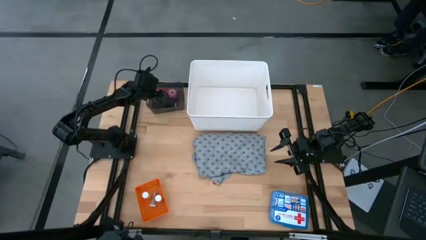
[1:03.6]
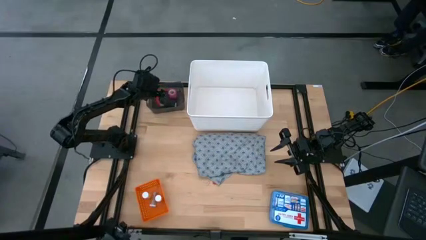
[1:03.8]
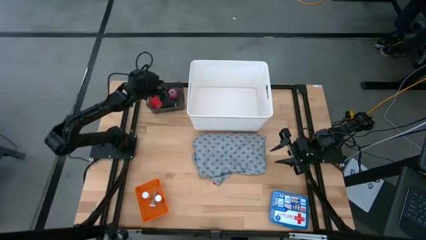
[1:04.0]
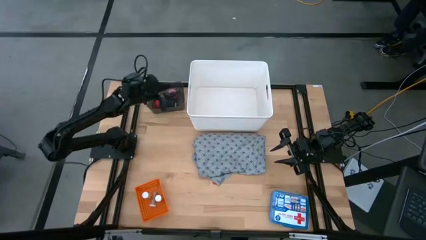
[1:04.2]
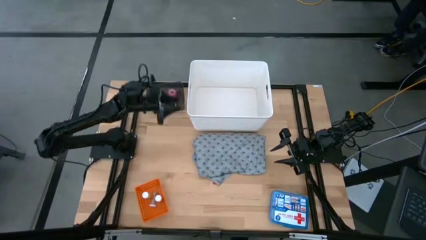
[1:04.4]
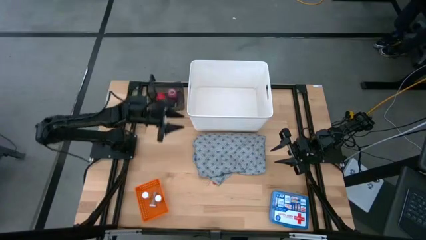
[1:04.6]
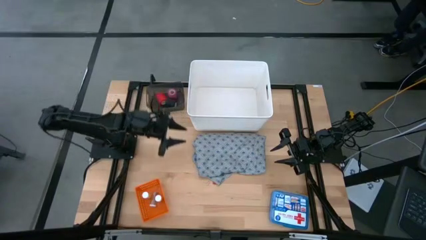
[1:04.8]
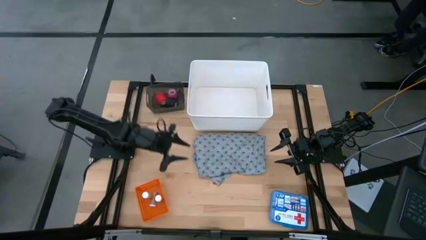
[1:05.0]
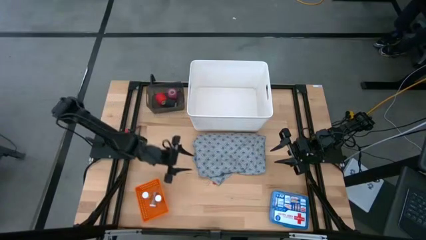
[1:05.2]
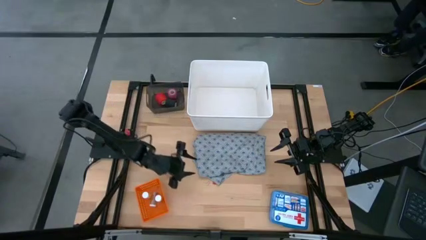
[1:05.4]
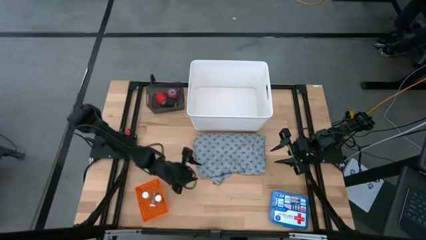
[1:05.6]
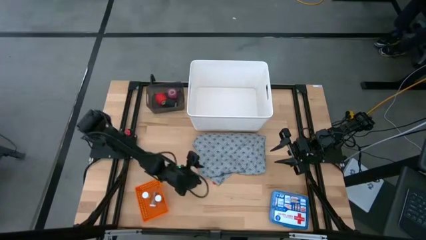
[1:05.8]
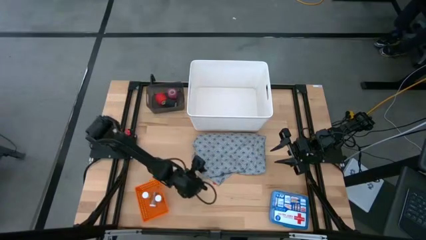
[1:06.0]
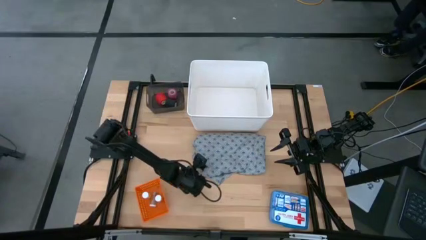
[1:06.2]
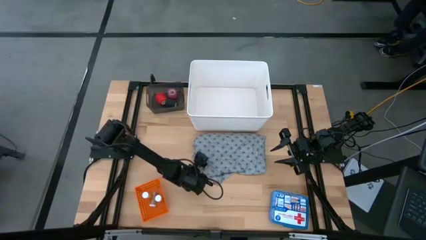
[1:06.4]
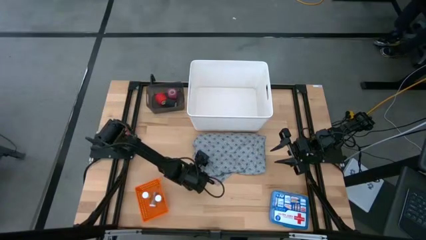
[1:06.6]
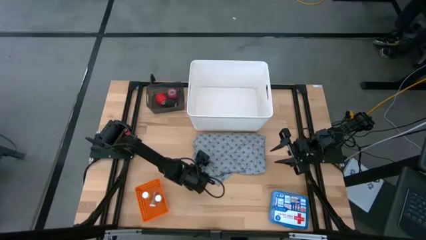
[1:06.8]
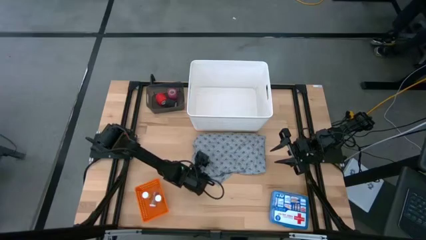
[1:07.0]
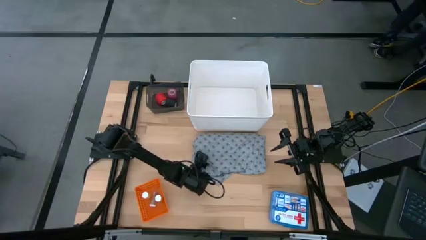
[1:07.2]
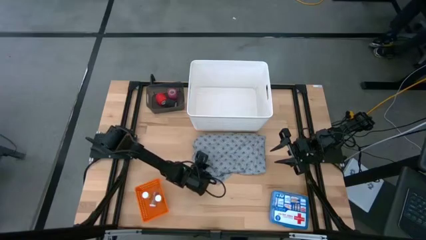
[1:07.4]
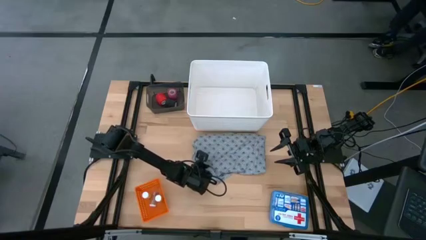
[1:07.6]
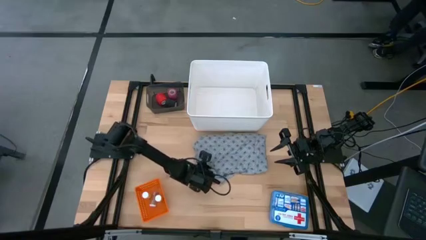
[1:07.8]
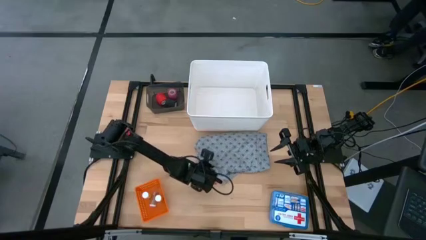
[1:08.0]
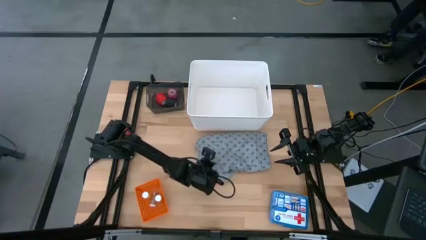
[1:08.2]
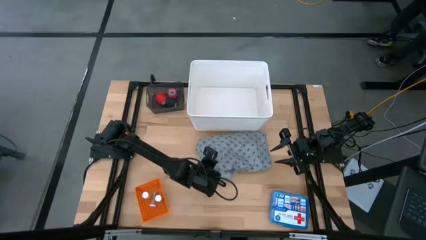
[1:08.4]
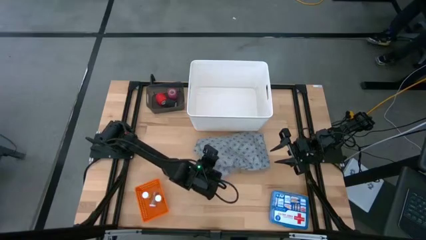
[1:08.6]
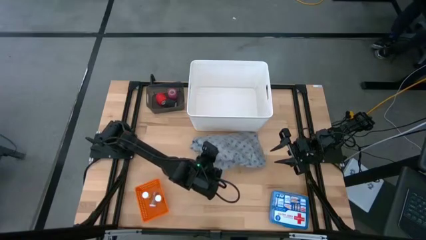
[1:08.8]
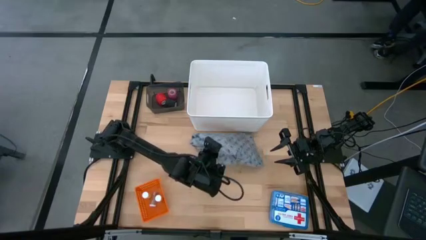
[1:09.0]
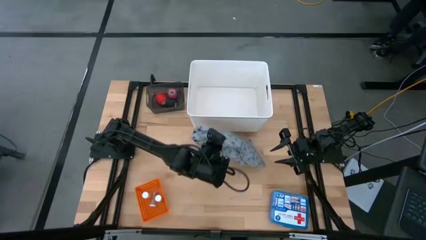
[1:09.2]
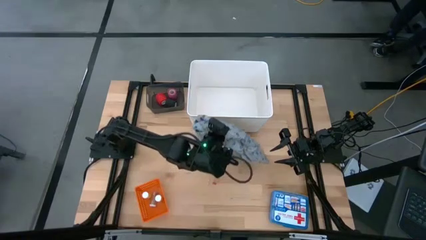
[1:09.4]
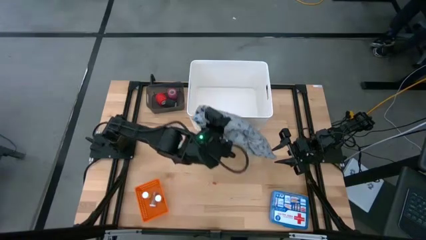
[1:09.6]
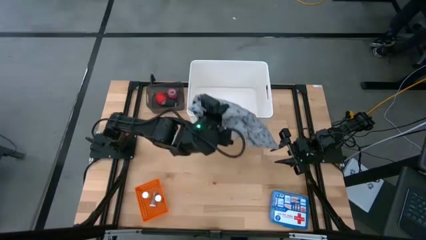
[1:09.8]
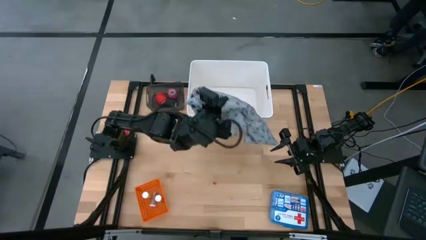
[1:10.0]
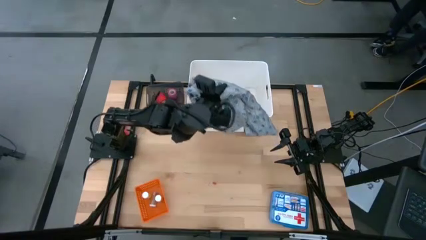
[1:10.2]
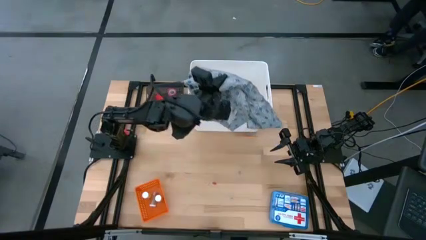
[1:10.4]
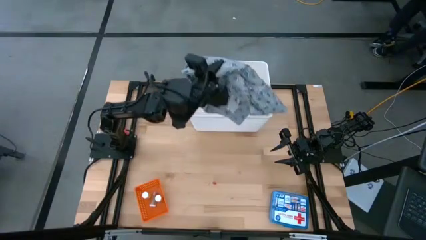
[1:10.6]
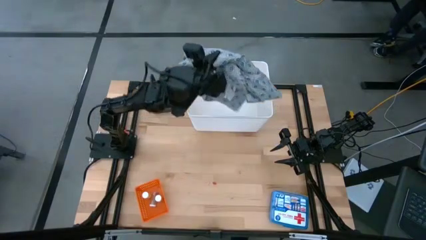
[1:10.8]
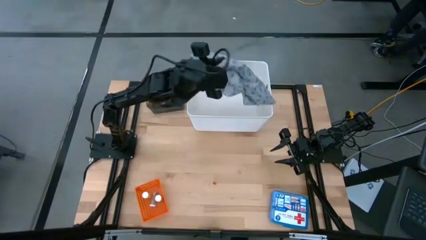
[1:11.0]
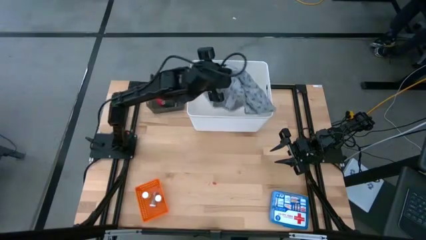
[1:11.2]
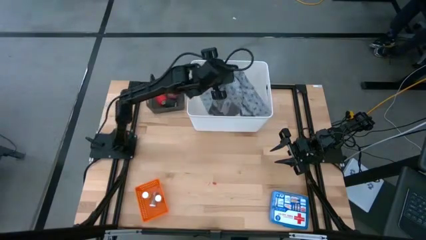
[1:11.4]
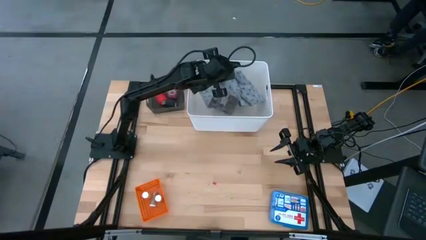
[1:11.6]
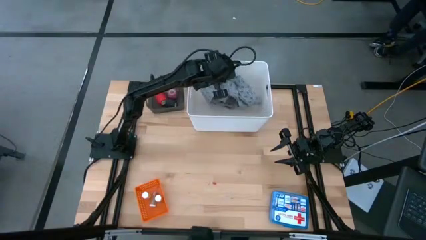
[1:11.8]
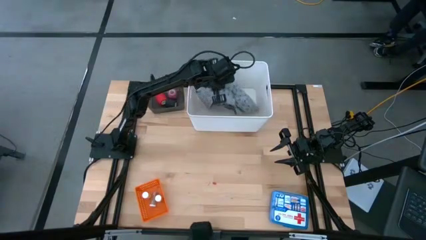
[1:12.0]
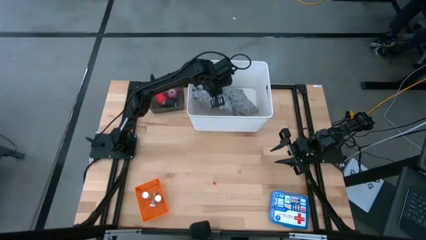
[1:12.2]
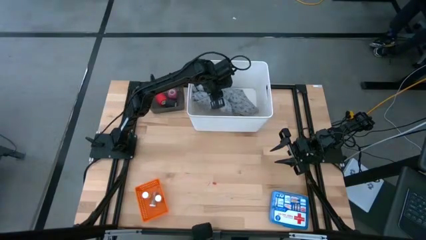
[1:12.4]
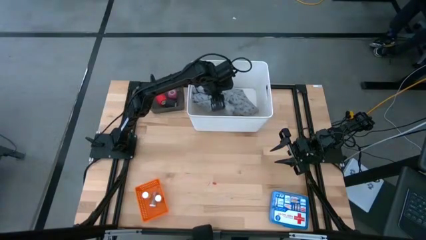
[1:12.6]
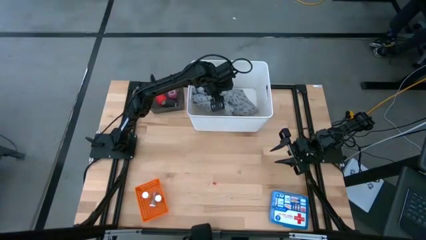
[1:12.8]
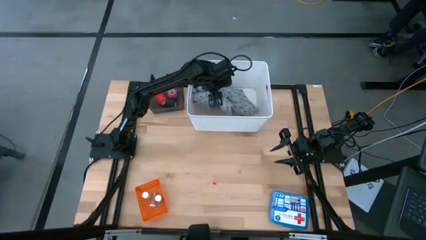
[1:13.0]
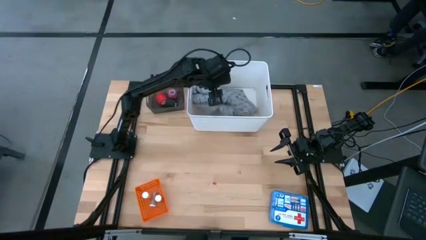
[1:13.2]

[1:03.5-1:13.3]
Task: Pick & Place Medicine items
Put the gray patient gown into the white laundry bin

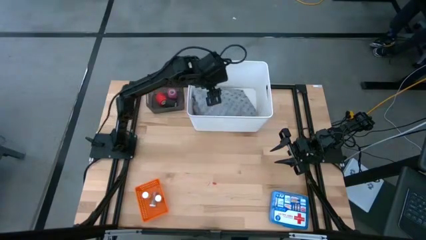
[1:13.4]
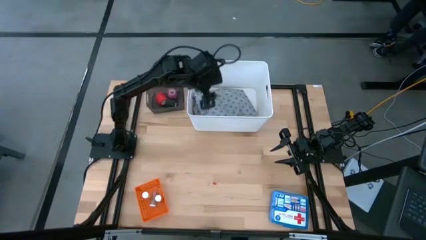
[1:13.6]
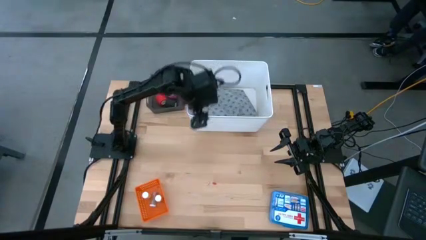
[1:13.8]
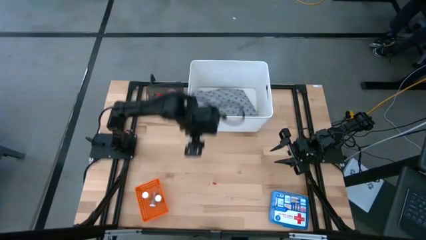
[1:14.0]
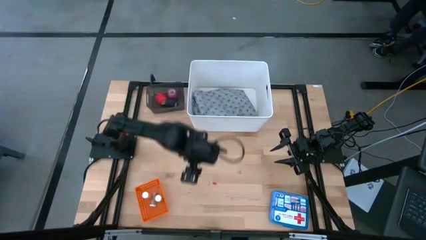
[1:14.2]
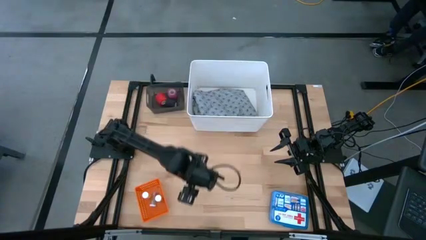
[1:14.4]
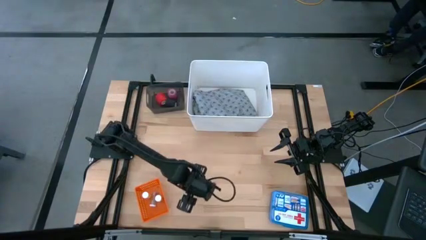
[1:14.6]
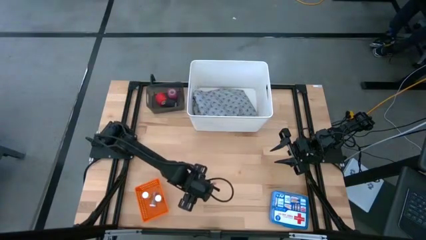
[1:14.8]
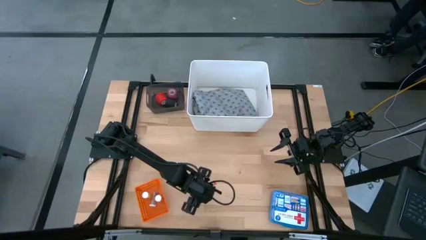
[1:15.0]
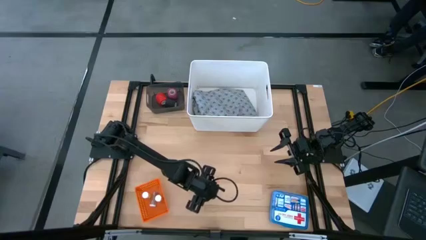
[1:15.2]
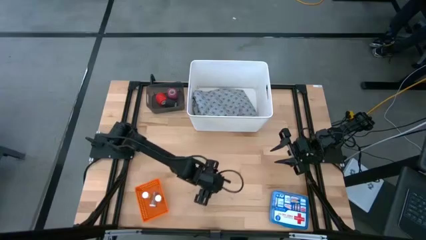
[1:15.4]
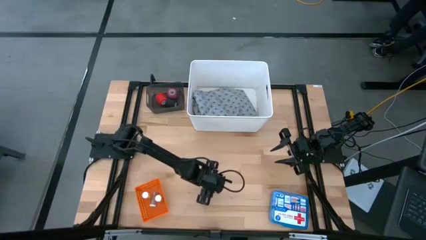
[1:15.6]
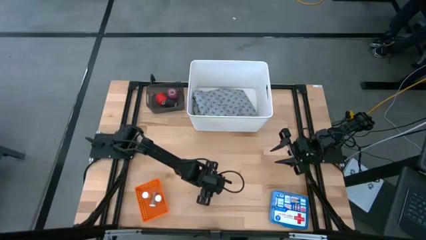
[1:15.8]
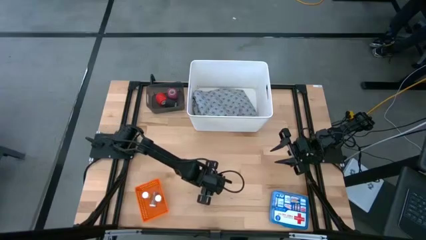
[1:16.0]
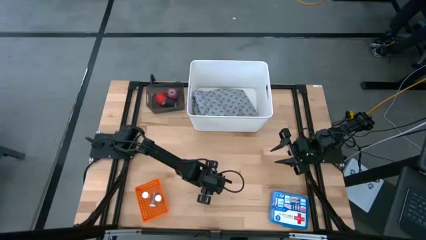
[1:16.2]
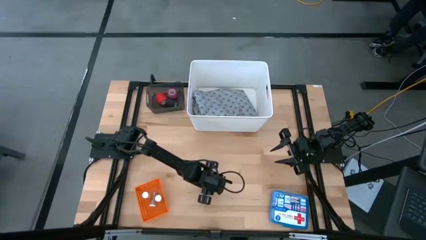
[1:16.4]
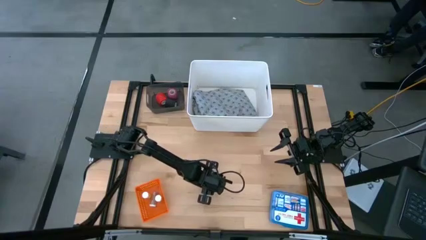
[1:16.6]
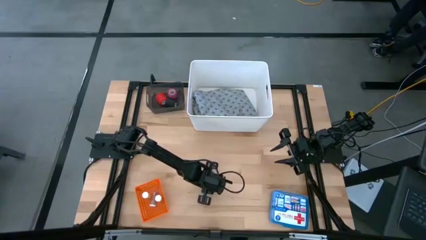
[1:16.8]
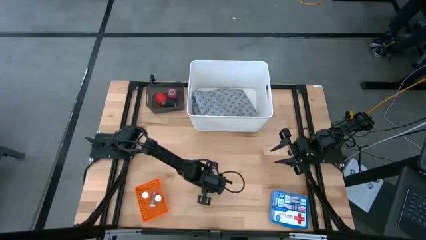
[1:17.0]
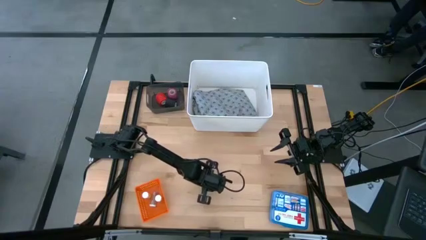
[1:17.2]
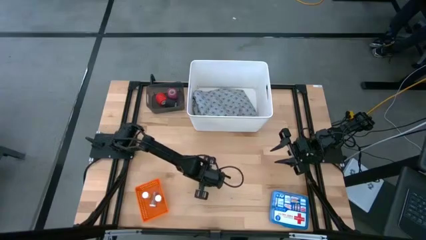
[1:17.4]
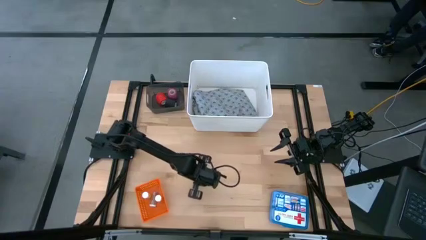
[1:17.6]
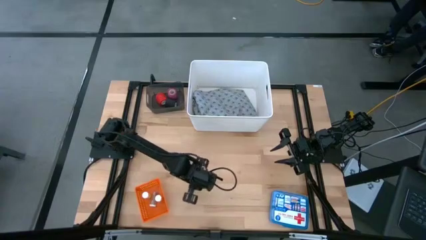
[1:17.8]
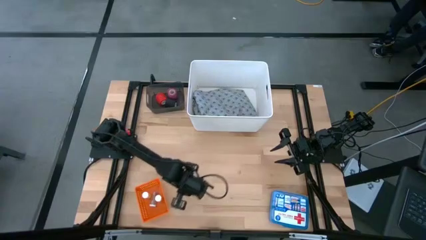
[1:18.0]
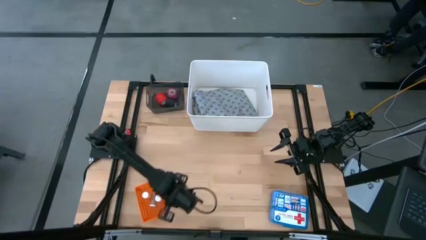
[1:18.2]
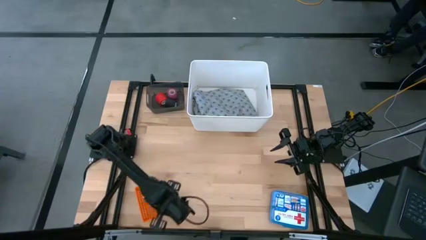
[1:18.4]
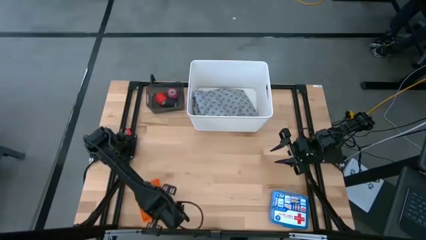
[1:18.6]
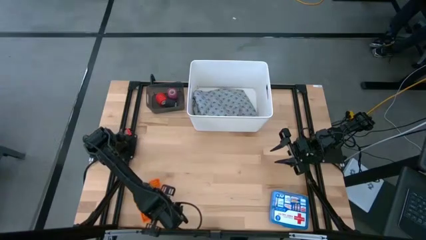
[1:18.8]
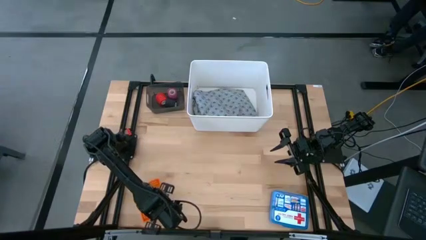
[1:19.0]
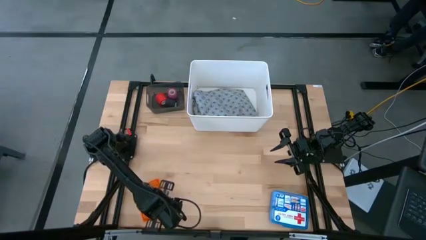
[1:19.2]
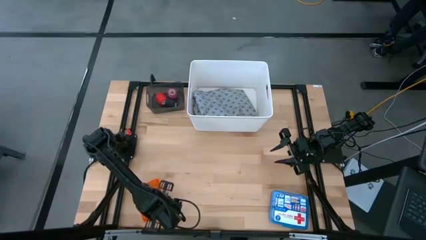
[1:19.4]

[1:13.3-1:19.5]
Put the red capsule into the orange bin
